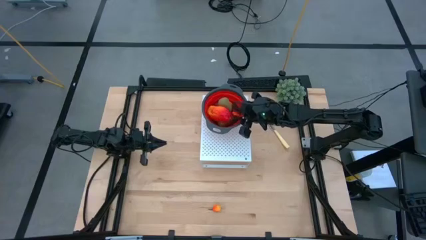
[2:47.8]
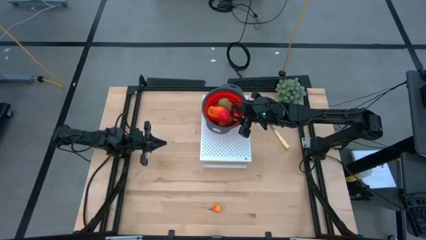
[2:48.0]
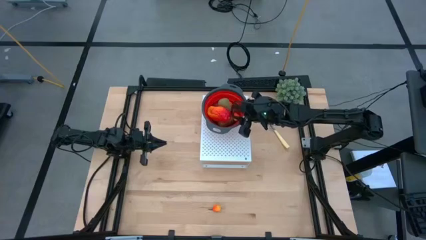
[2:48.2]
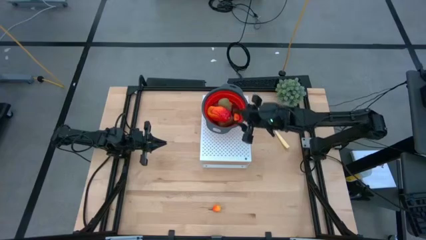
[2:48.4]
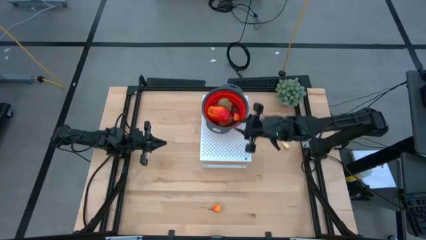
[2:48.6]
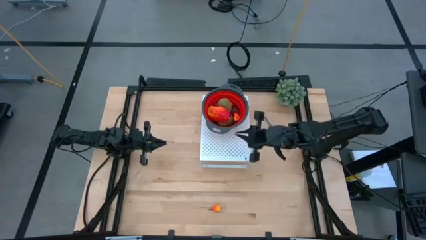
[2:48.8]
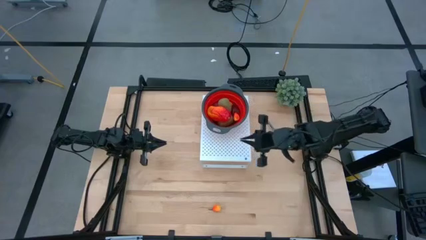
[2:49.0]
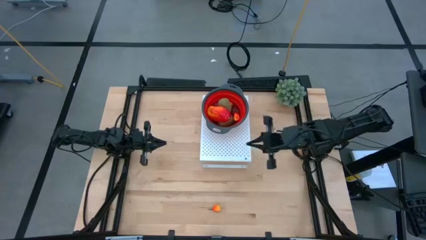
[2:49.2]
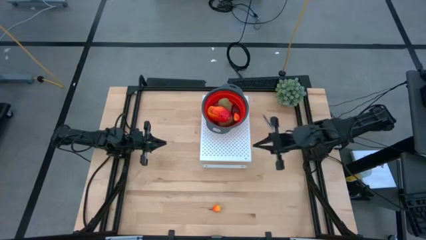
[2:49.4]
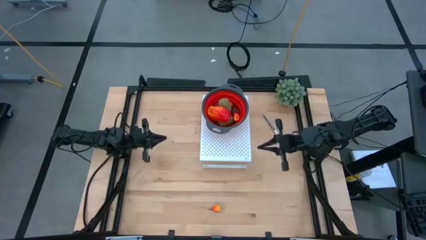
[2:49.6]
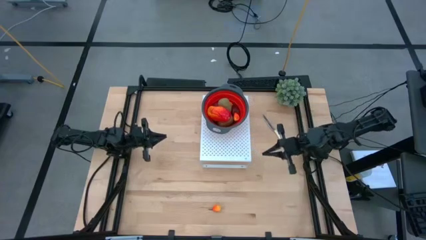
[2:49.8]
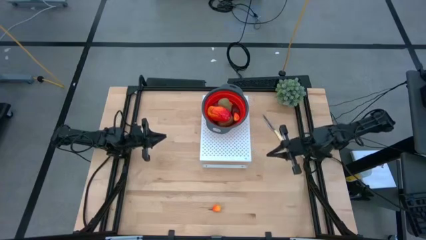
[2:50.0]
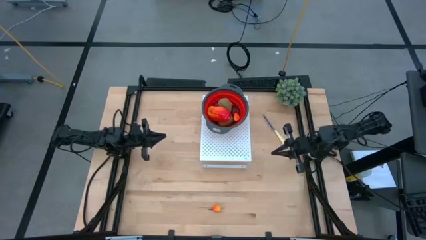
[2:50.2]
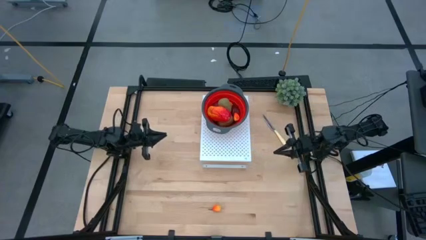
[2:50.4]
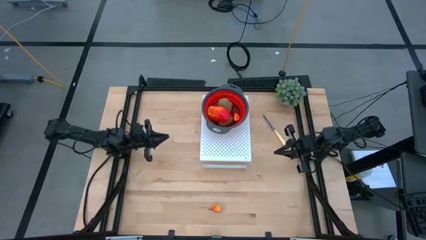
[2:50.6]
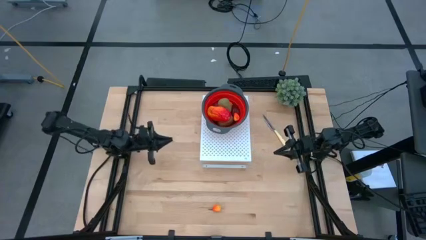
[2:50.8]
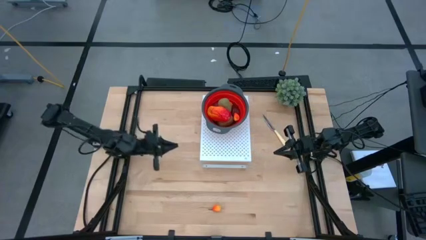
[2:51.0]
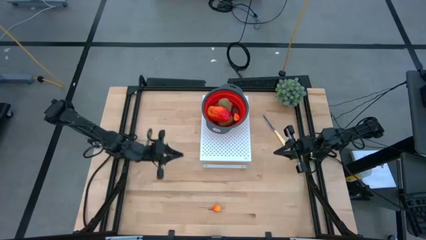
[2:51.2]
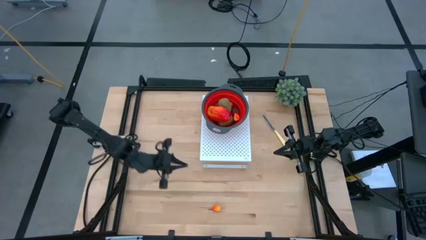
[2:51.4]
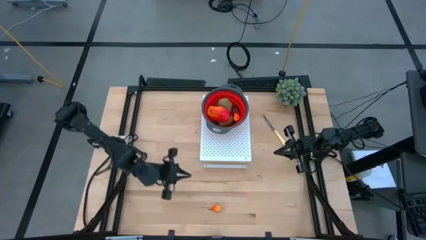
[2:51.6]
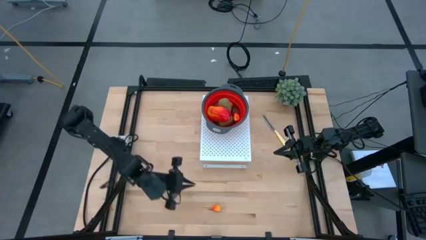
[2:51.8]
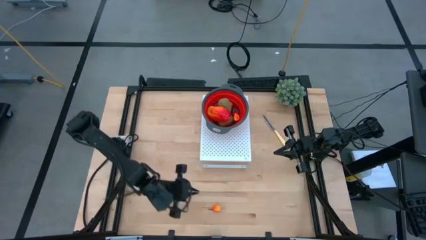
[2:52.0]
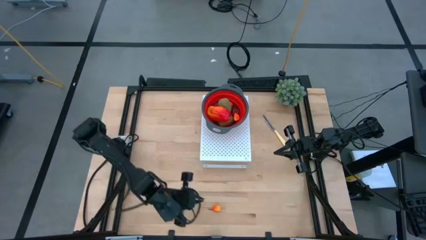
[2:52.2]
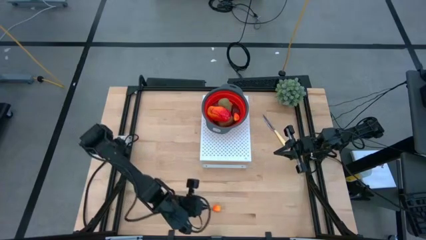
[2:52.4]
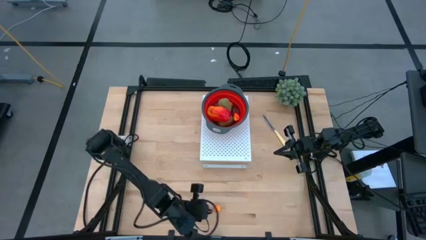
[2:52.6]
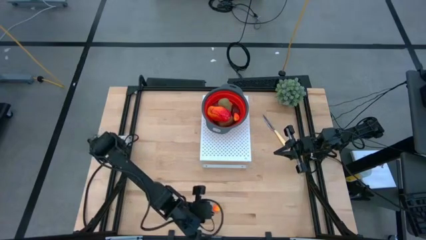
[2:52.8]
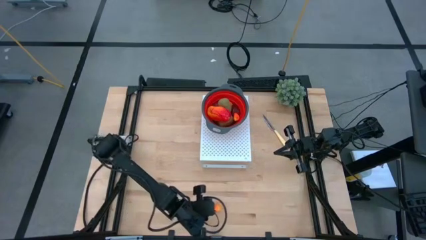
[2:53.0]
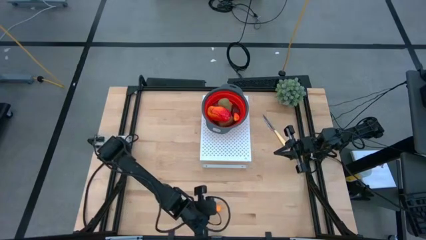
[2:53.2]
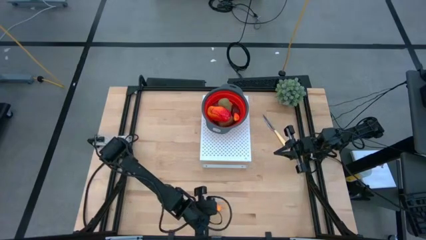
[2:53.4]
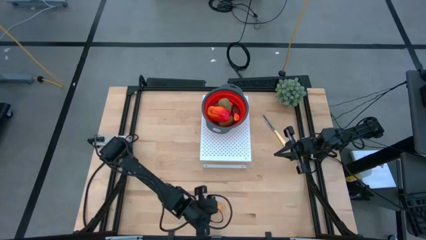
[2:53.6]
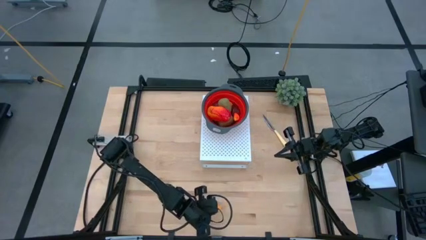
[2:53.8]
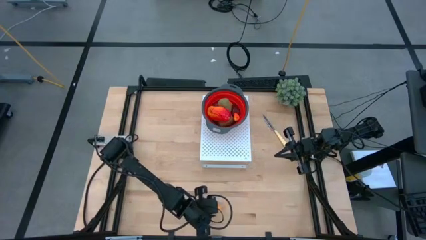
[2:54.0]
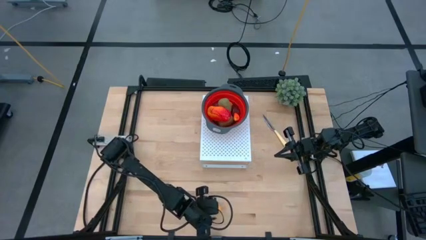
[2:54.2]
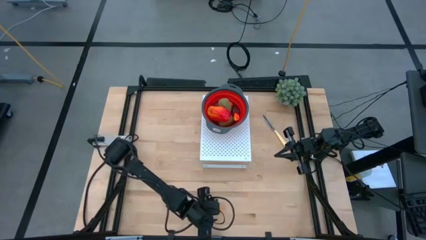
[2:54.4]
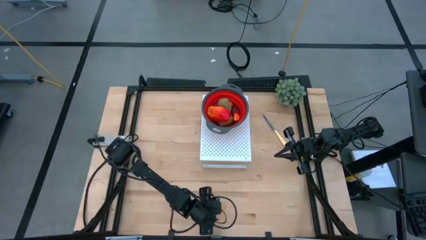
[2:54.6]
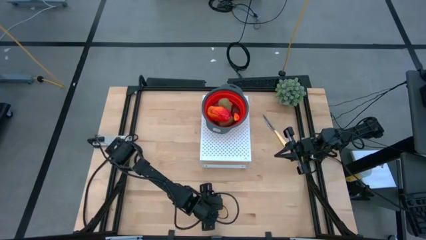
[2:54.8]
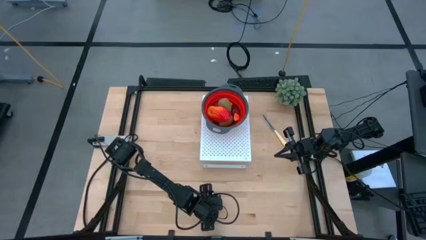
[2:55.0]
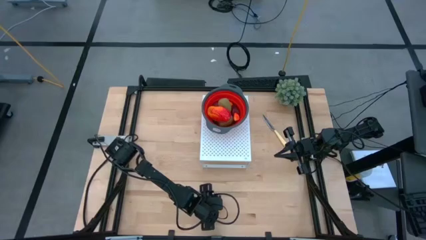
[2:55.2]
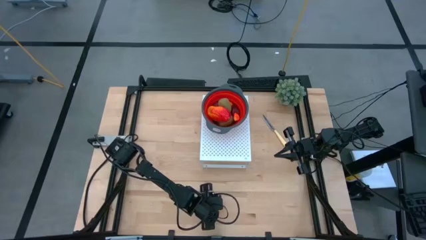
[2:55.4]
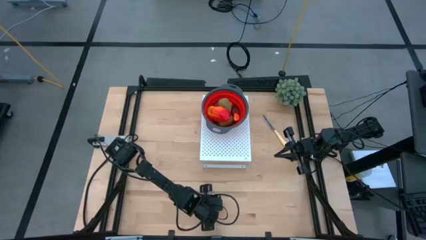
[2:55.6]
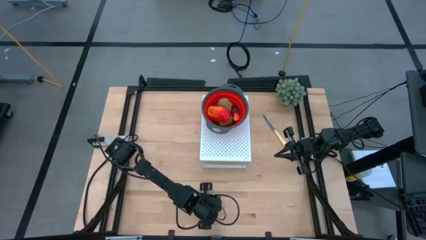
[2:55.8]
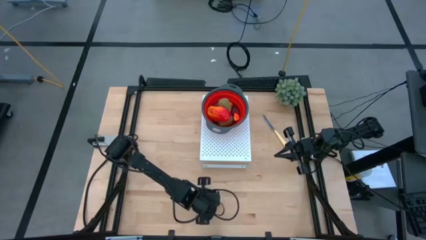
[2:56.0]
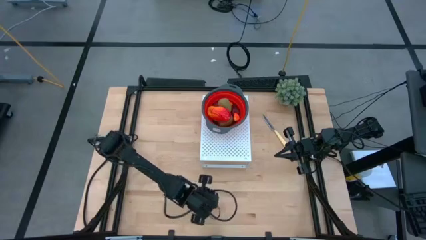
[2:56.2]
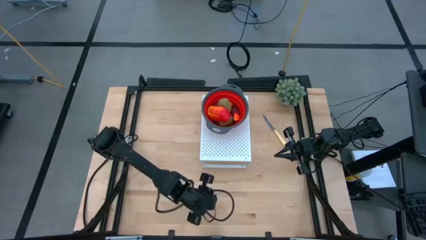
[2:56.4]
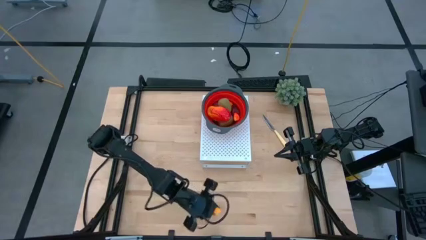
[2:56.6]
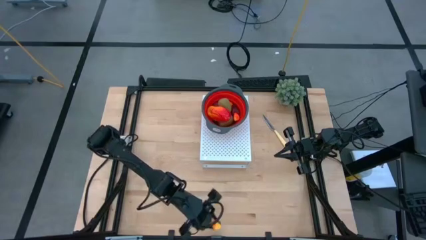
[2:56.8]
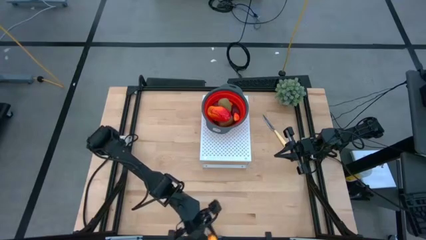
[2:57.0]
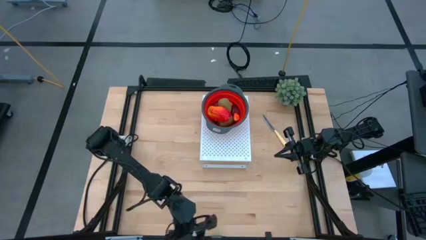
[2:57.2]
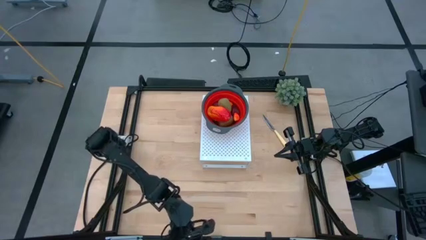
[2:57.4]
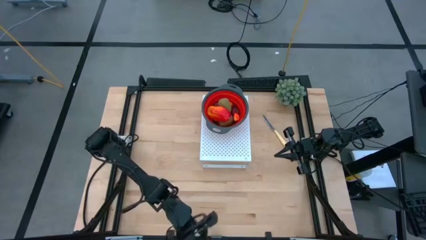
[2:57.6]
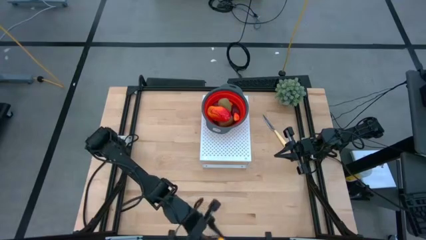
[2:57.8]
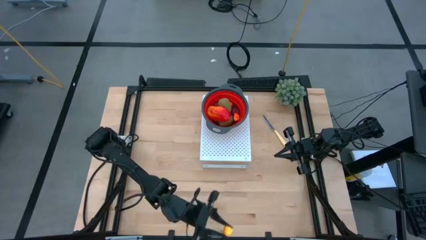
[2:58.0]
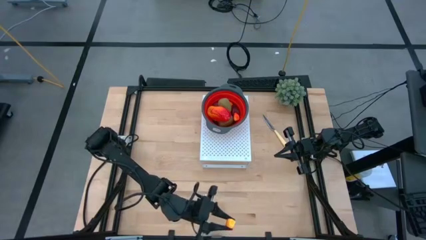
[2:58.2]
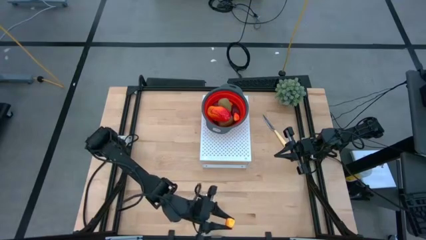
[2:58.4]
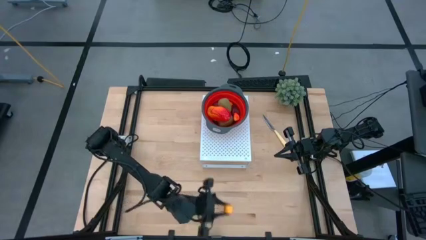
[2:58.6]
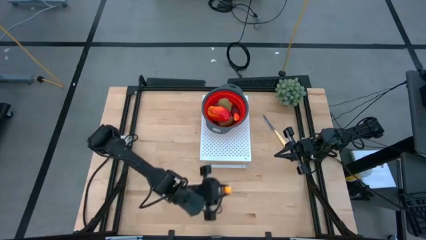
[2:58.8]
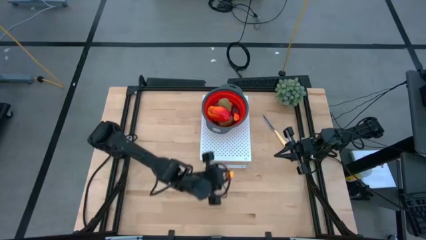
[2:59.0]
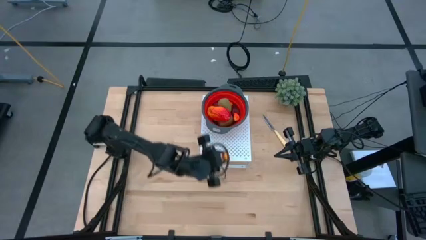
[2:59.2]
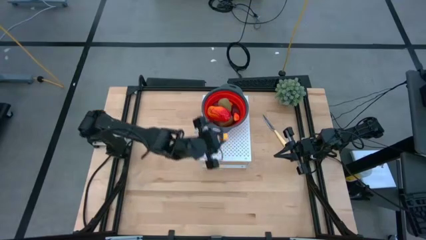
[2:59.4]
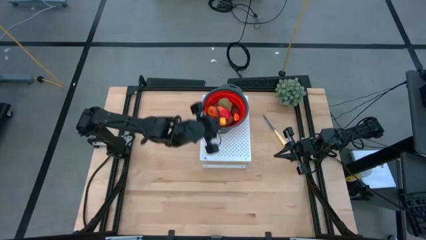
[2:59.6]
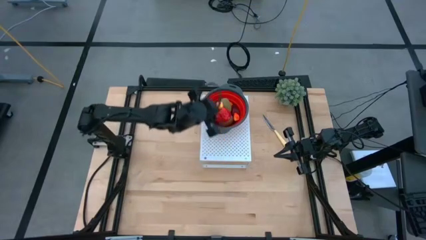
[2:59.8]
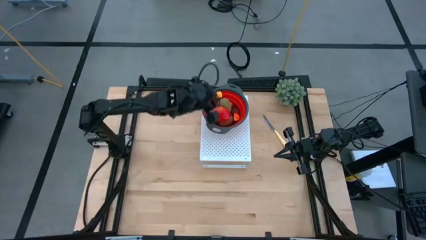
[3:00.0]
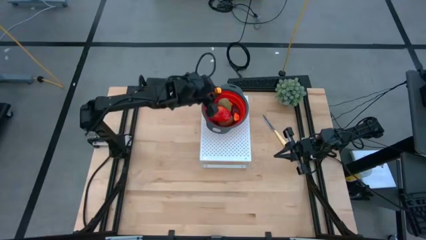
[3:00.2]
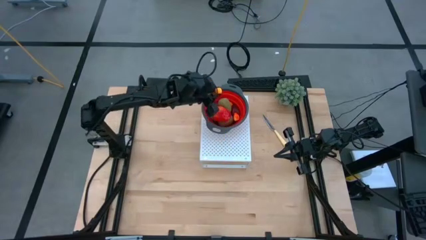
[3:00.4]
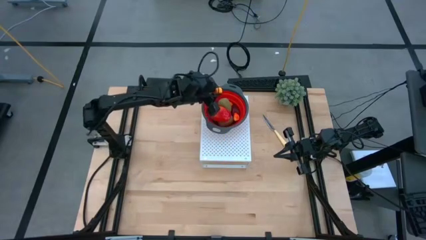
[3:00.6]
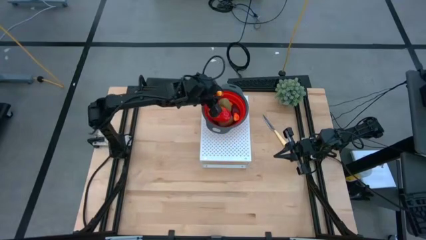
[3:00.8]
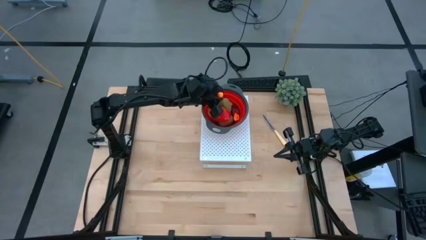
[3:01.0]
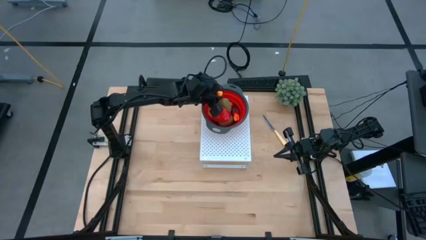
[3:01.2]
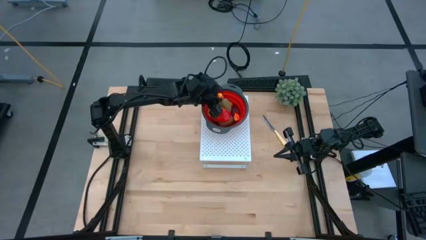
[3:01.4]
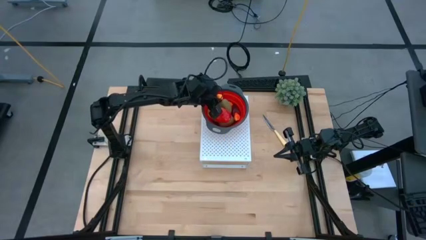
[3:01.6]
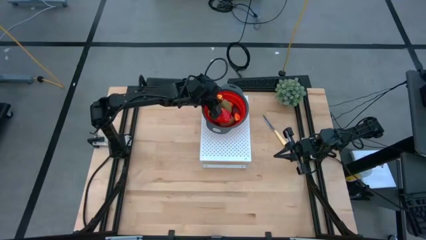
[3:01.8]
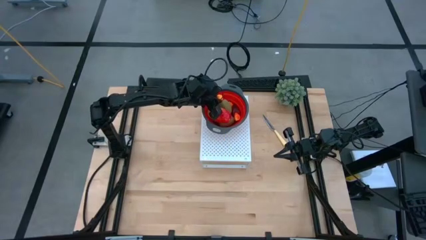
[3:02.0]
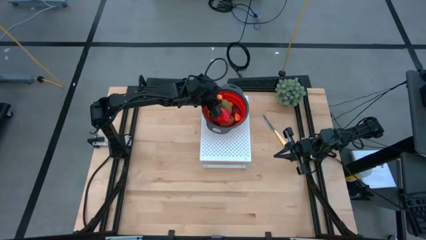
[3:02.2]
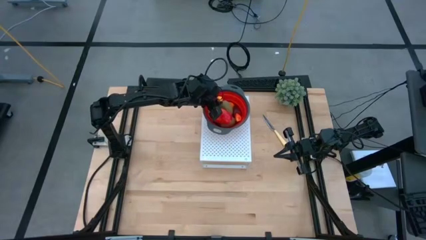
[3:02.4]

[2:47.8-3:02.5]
Task: Pick & Place Fruit
Put the orange pear into the red strainer bowl

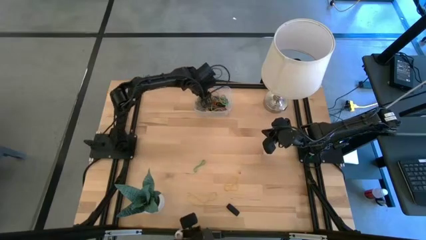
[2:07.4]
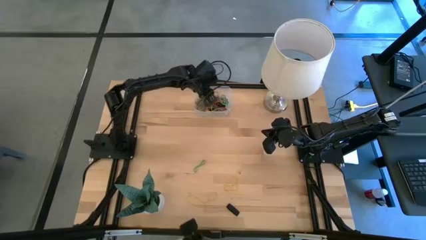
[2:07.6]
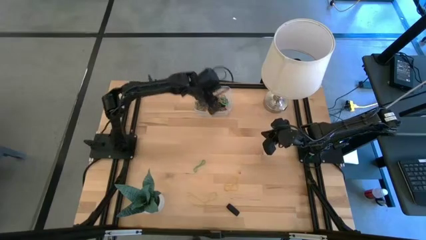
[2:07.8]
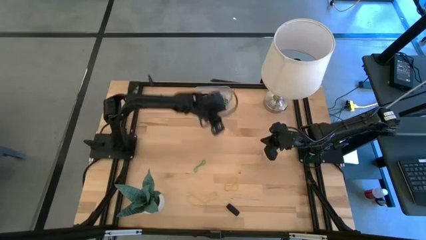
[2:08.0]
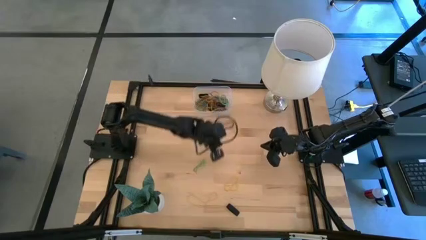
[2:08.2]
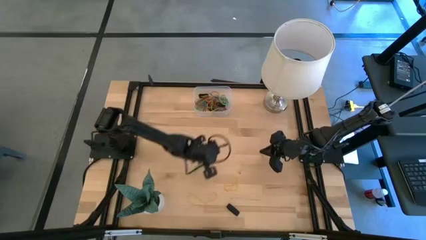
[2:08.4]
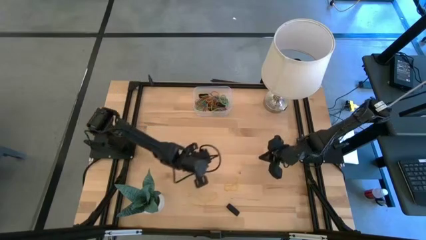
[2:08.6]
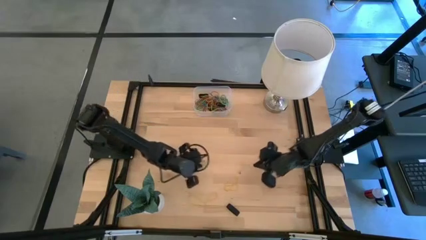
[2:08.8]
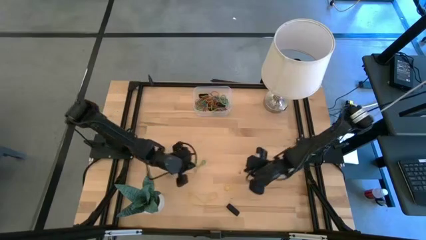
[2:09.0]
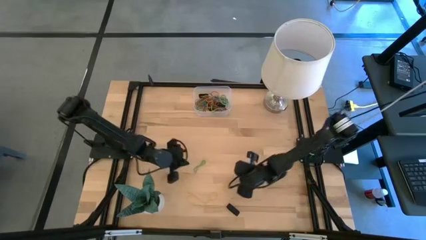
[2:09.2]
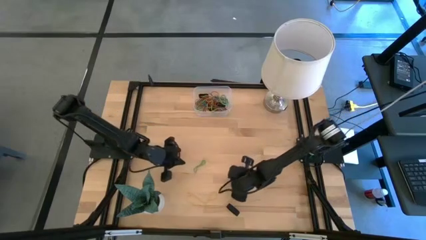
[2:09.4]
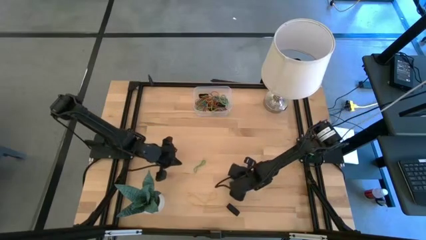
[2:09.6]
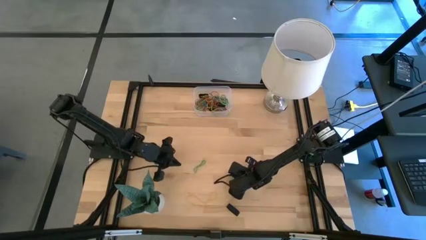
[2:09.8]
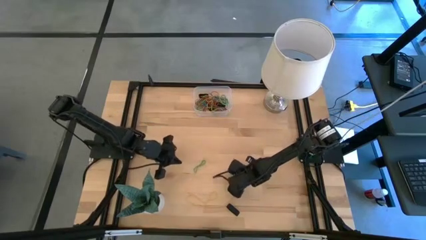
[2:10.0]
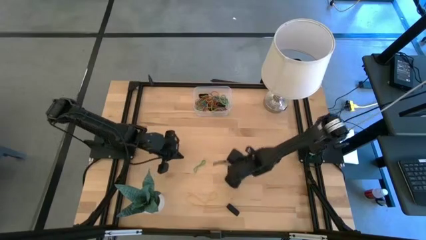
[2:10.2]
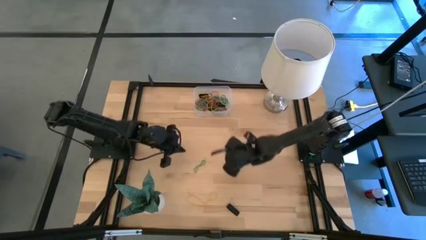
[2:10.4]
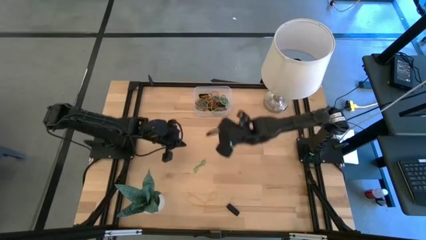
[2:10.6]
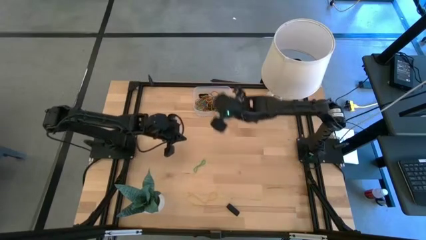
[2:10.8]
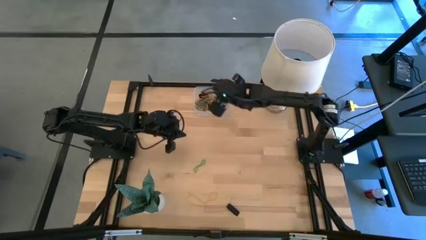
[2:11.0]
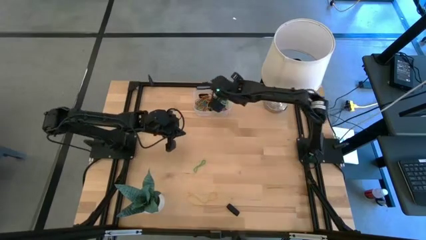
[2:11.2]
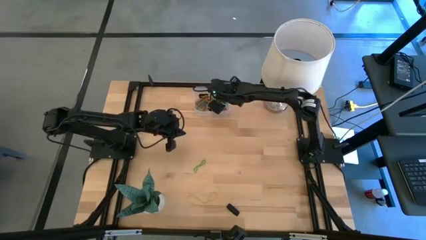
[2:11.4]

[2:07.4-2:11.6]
Task: Pick and place rubber bands into bin
Put the yellow rubber band into the transparent bin
